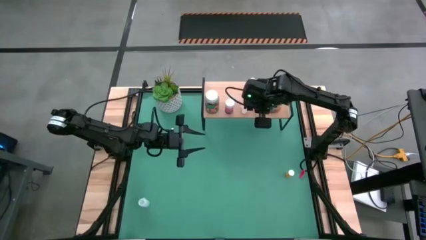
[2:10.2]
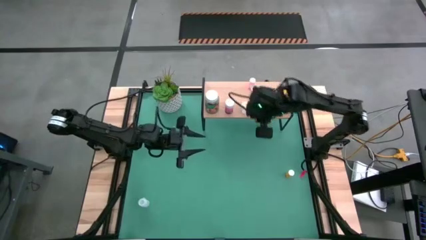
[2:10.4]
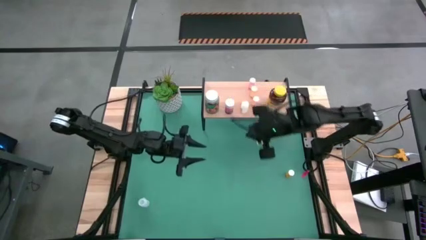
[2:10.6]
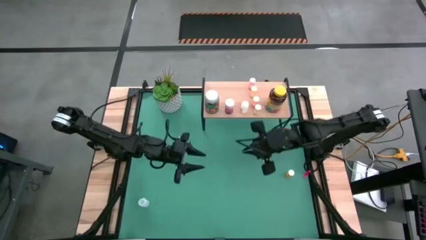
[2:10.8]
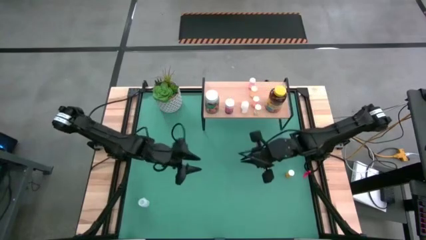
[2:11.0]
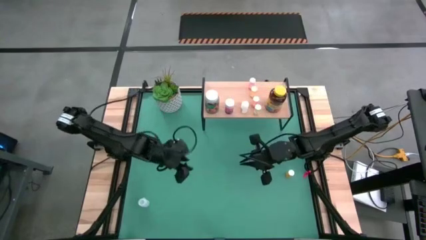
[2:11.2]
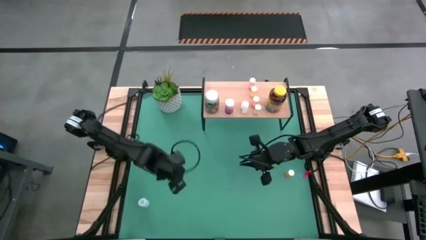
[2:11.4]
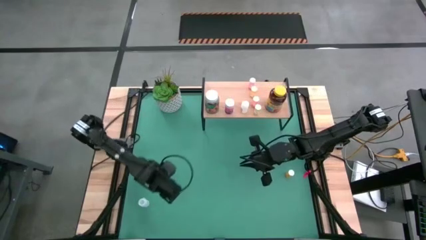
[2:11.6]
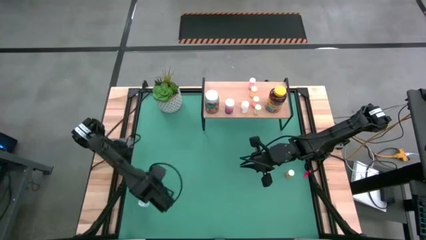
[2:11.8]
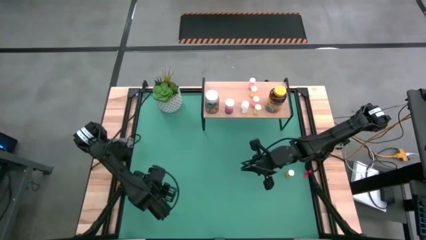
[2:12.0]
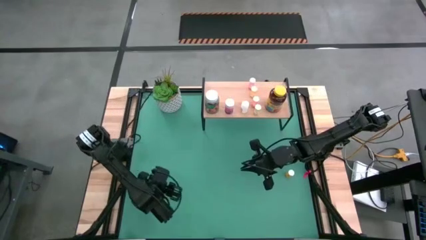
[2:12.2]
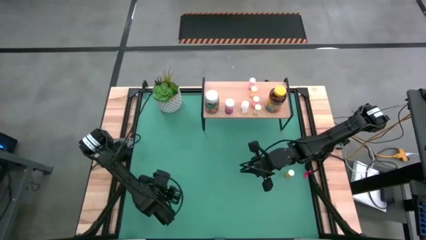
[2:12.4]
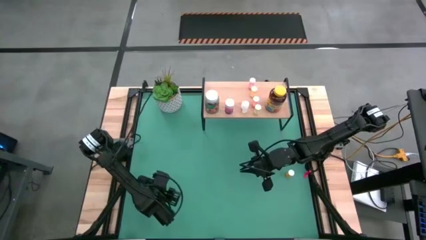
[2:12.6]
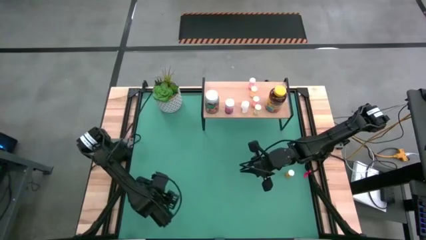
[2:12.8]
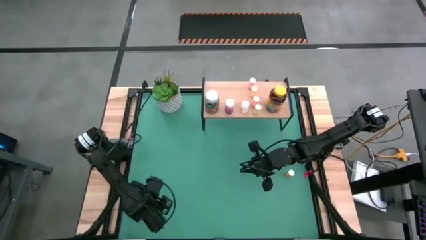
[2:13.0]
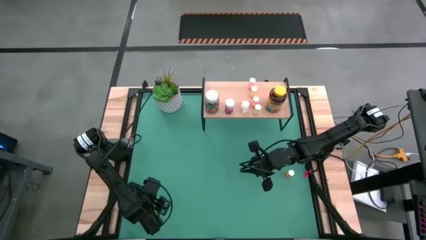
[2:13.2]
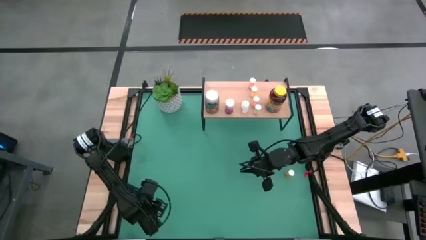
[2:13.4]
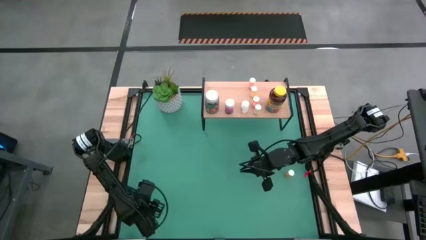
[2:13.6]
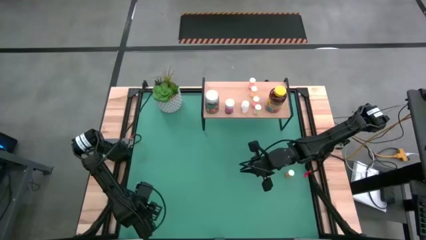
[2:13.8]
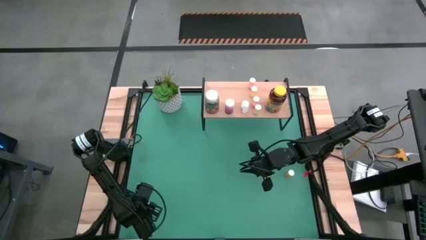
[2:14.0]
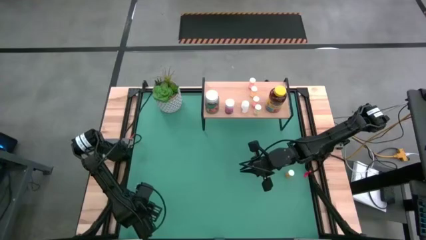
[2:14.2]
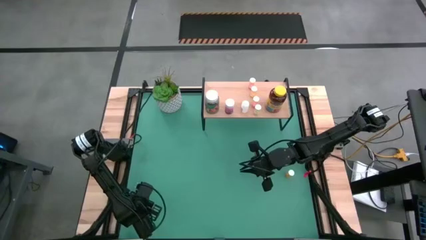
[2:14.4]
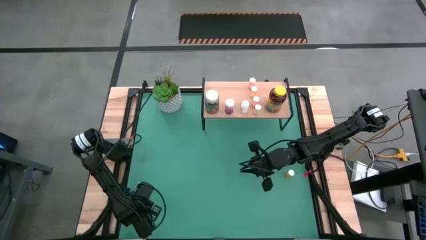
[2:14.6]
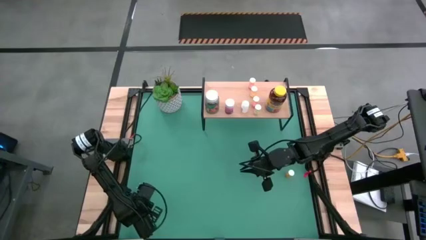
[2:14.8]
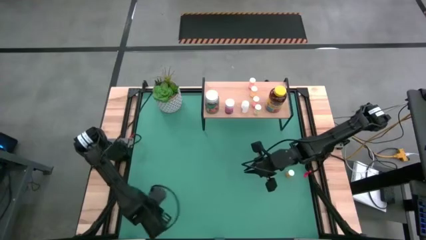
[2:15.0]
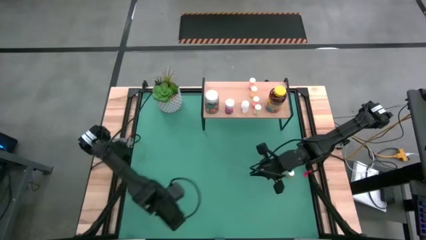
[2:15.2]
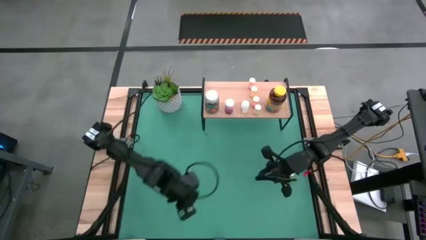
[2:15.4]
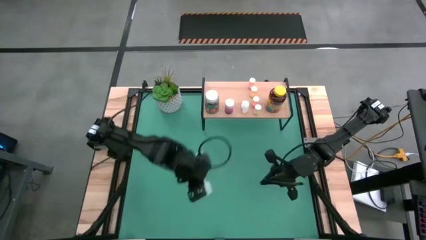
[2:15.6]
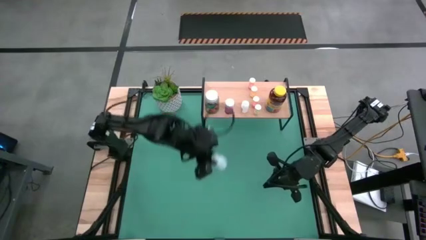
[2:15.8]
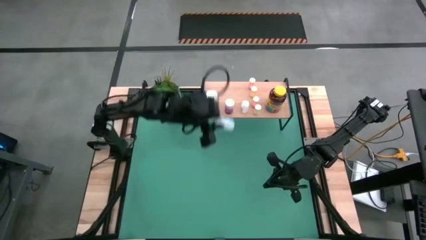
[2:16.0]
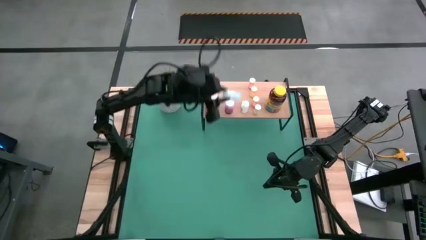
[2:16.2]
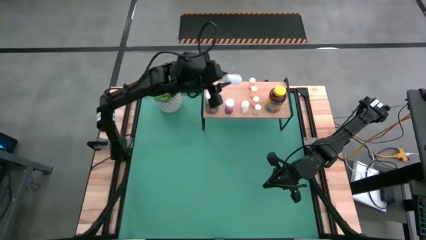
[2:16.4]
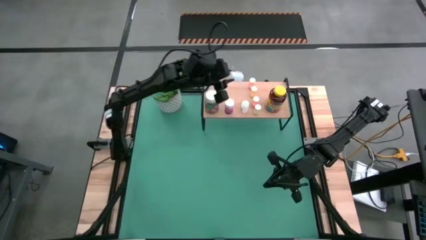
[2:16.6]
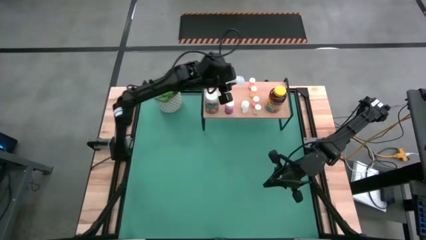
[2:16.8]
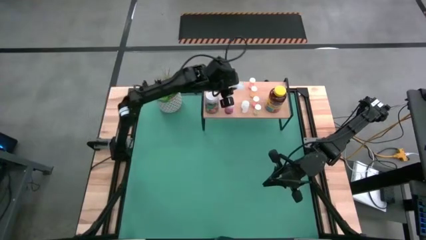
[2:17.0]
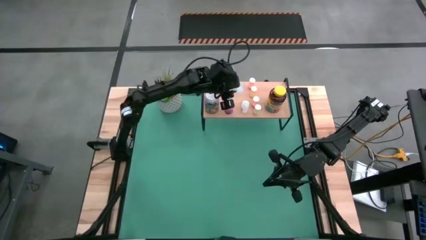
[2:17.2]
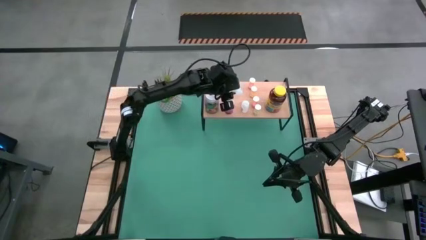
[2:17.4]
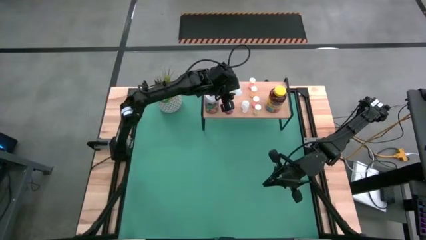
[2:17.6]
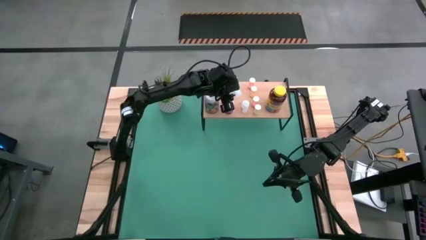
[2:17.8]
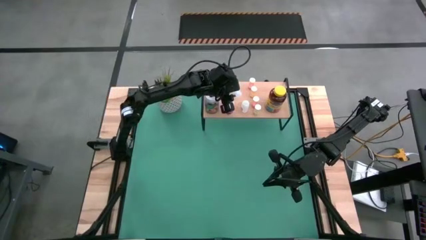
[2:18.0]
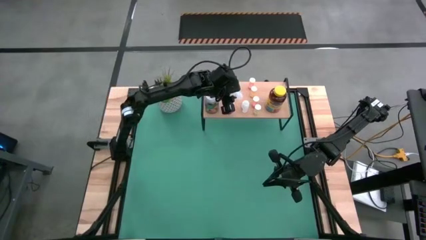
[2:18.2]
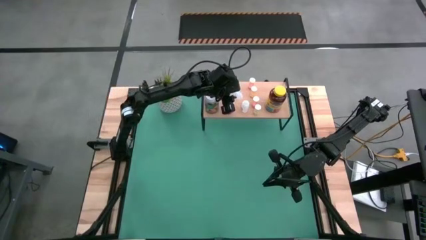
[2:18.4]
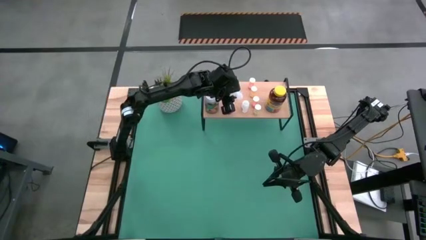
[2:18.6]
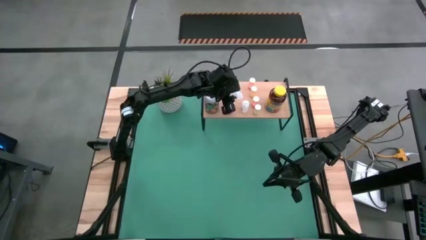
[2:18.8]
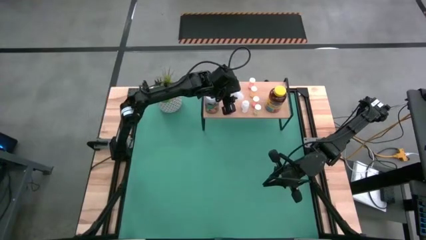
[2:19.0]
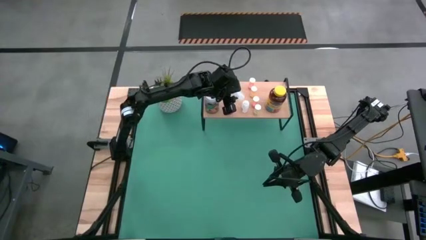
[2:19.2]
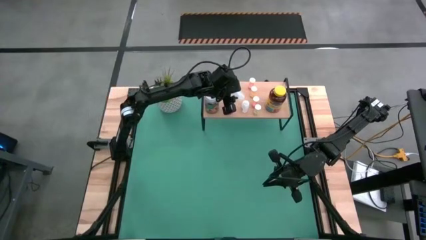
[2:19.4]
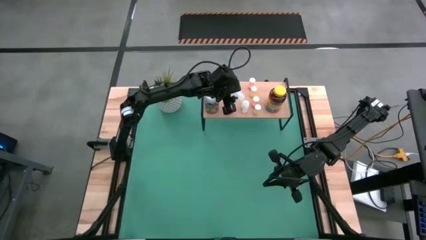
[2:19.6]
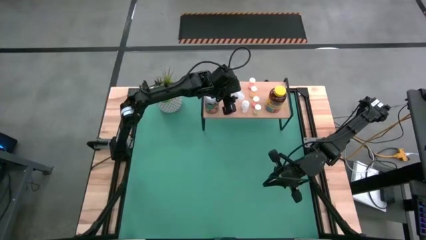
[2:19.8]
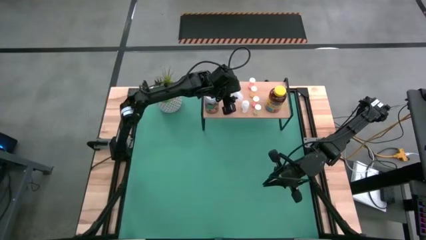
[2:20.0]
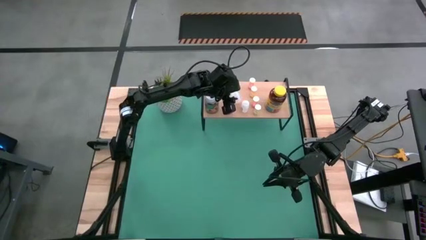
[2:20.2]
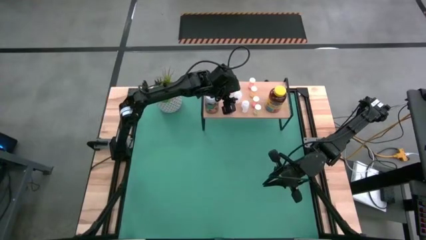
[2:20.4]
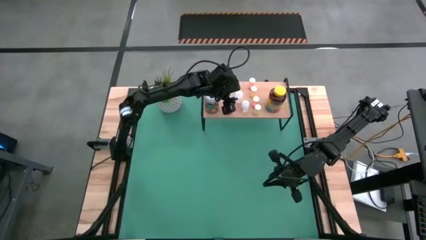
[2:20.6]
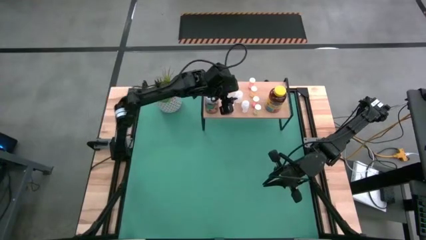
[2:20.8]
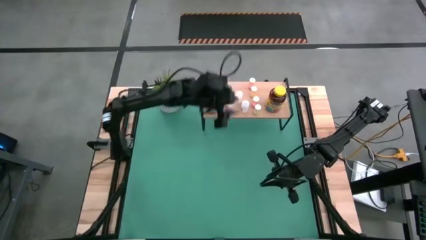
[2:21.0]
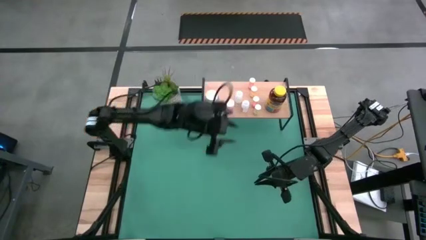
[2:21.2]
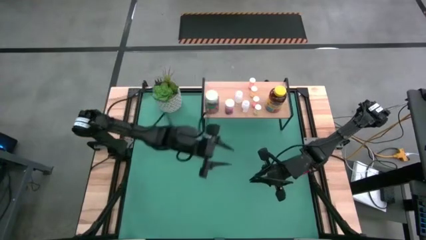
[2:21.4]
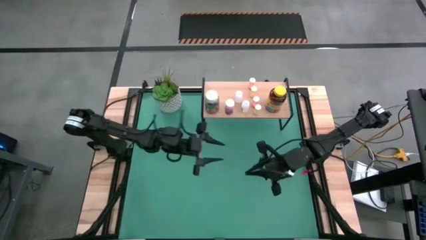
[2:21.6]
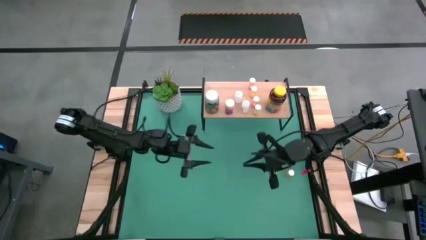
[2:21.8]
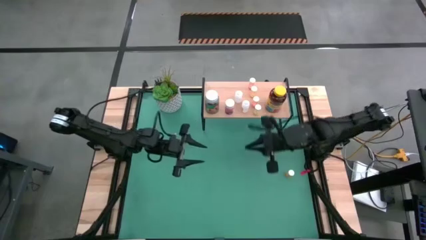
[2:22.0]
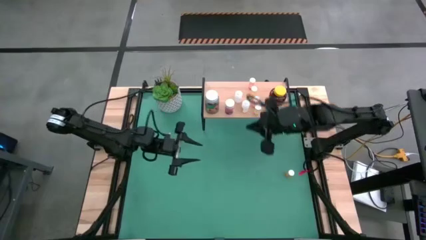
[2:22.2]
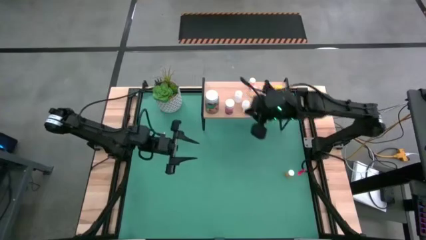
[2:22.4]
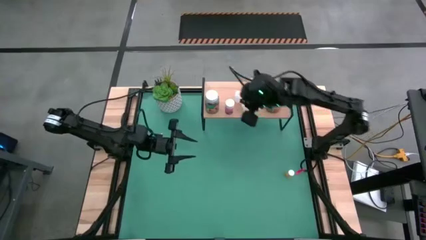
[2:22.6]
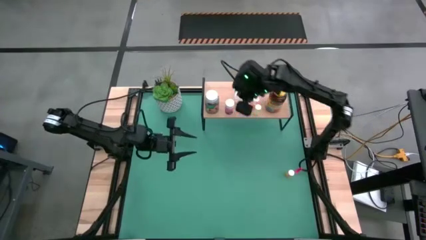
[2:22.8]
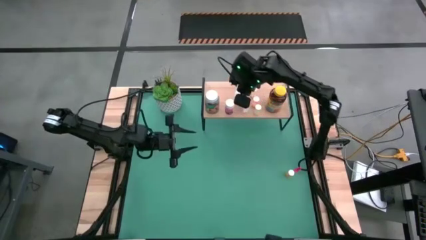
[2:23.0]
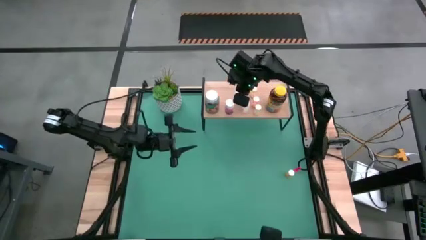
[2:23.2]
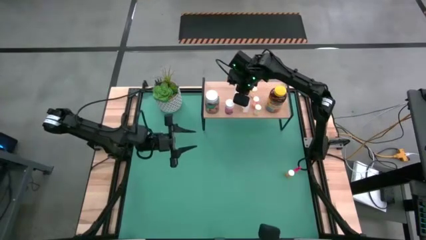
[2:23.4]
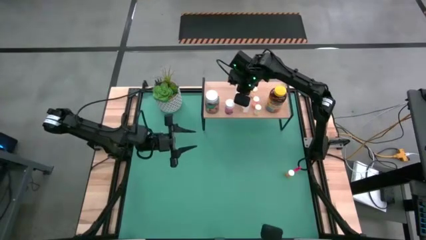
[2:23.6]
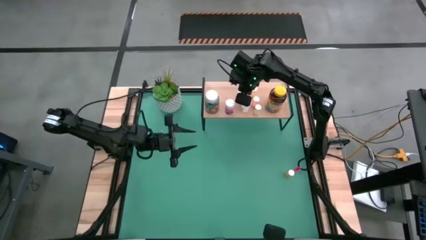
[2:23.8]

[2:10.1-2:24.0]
Task: Pick and place medicine bottles onto shelf by color
Put the transparent medicine bottle on the shelf

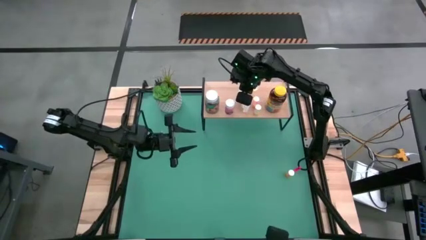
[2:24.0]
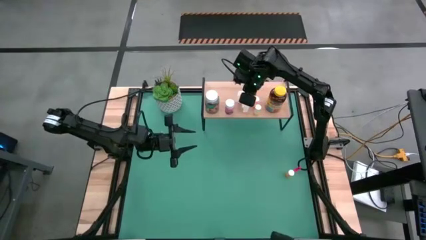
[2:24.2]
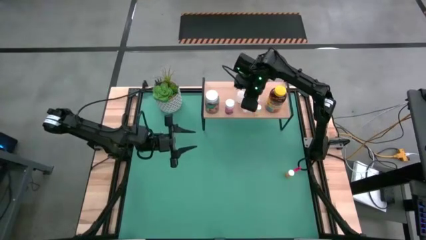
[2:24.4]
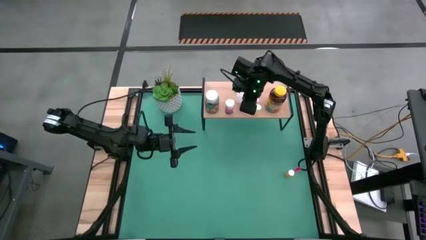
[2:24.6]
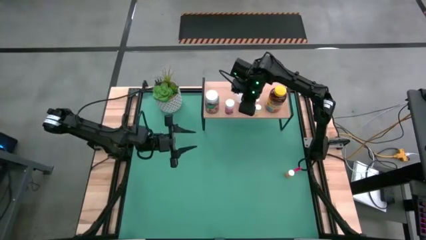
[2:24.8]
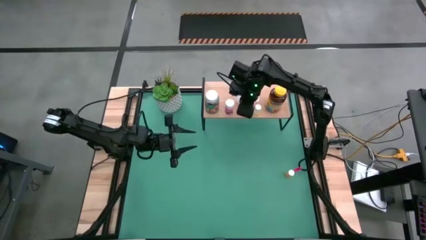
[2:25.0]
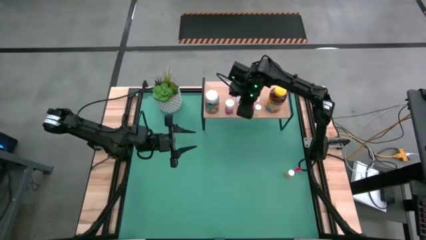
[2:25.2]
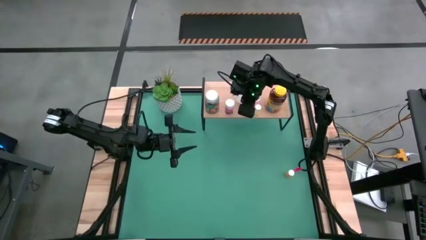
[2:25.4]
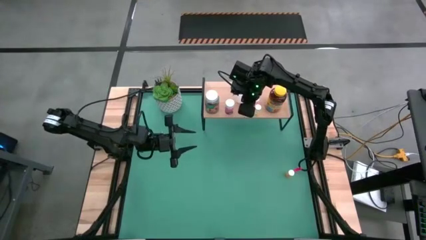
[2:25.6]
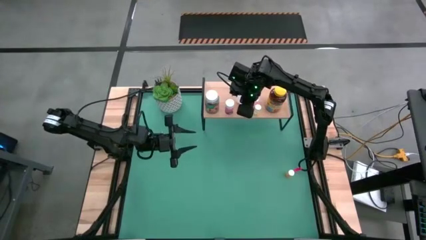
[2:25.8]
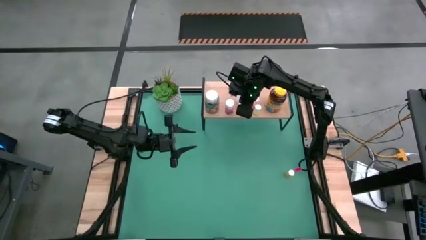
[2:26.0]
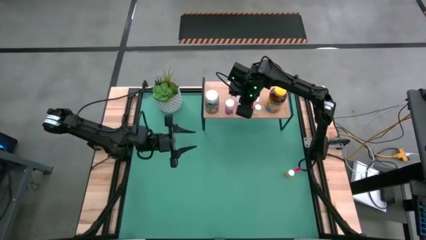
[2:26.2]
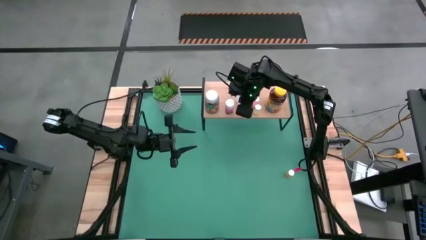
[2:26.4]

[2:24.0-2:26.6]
Adjust the transparent medicine bottle on the shelf
